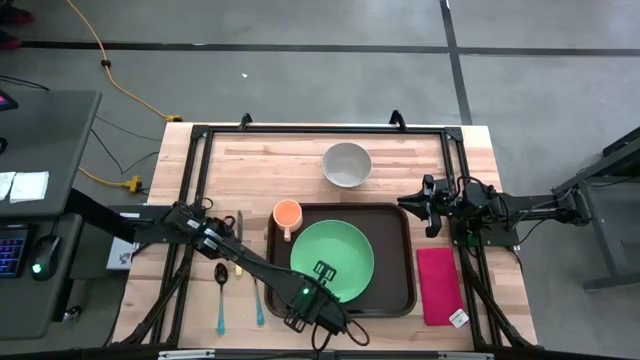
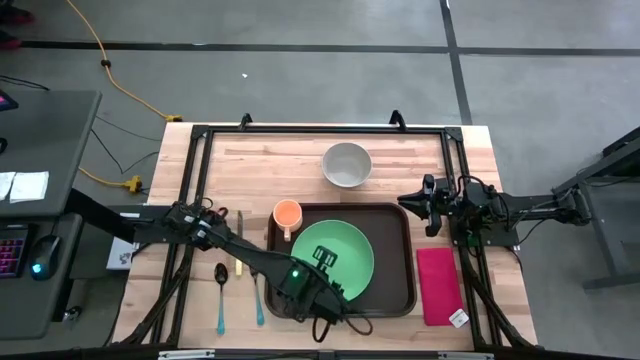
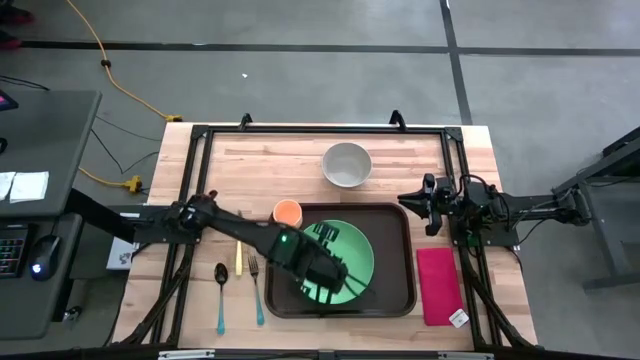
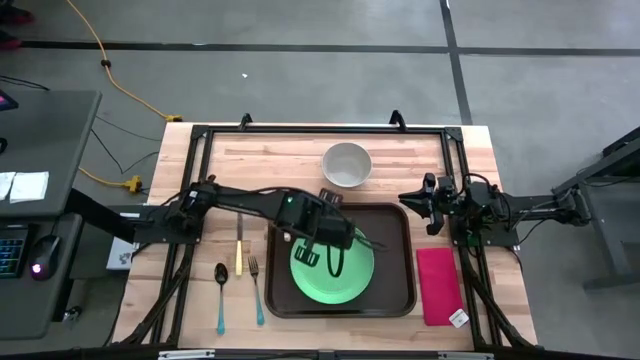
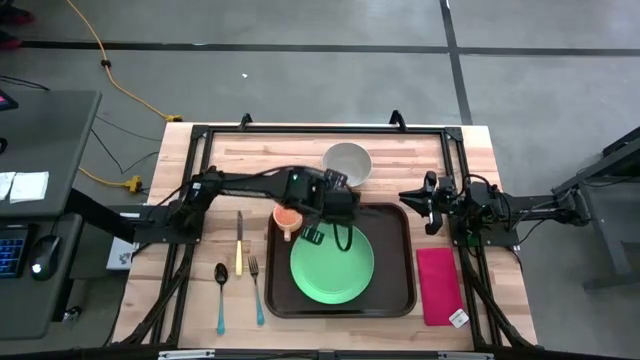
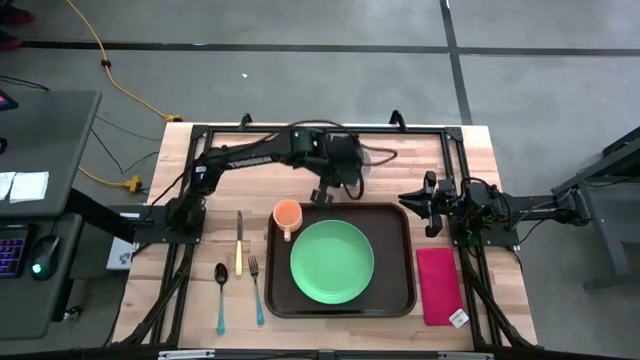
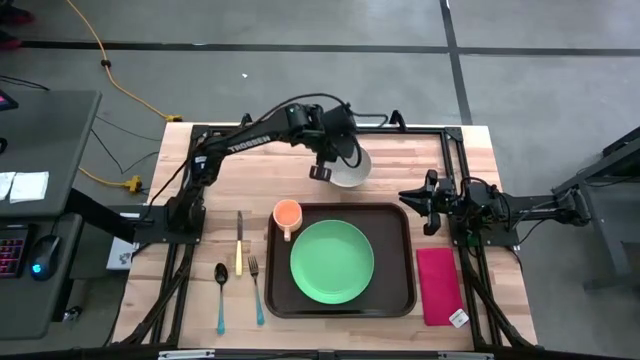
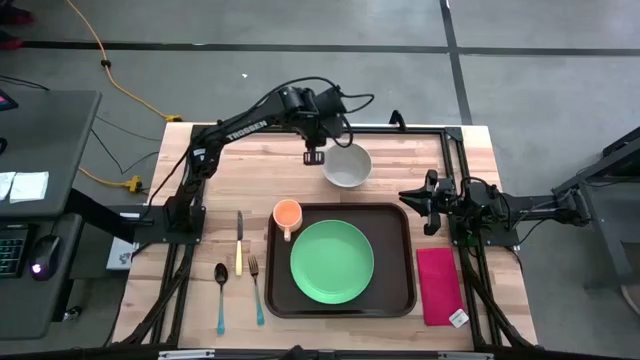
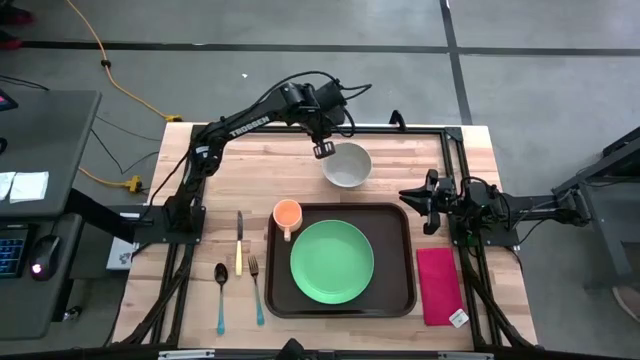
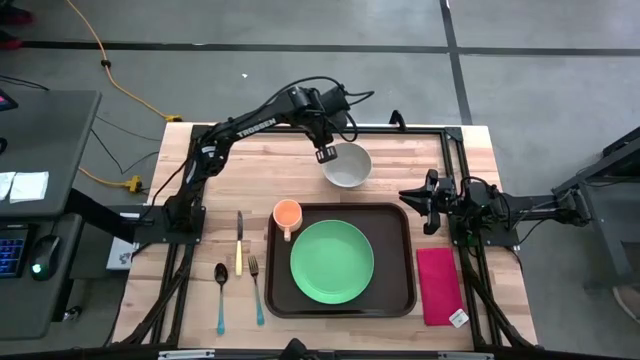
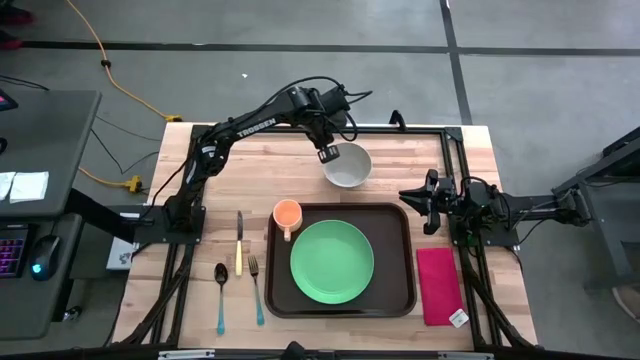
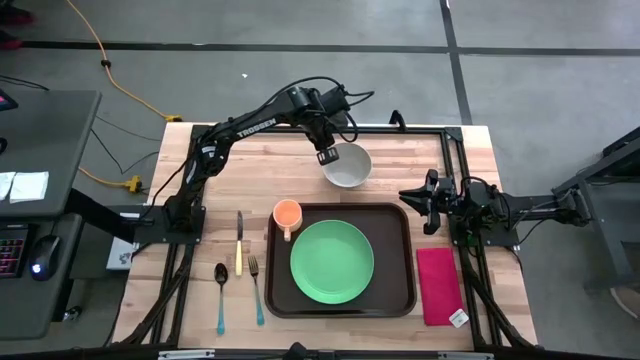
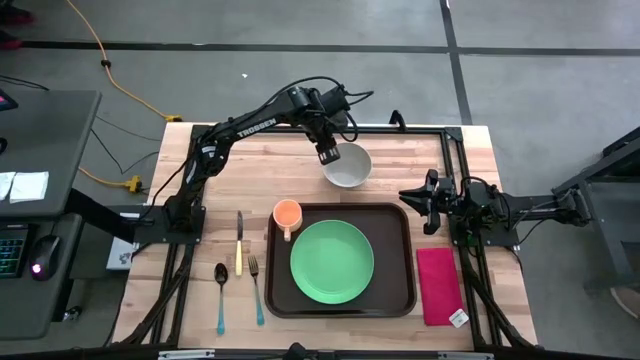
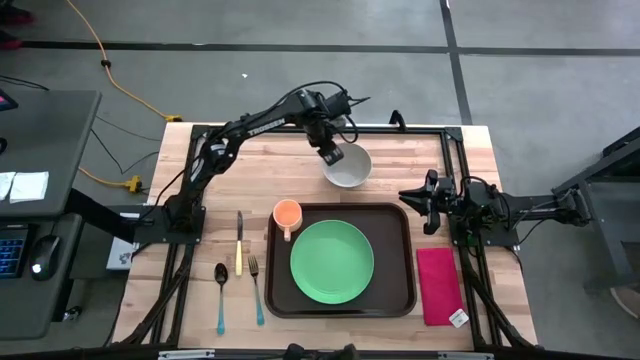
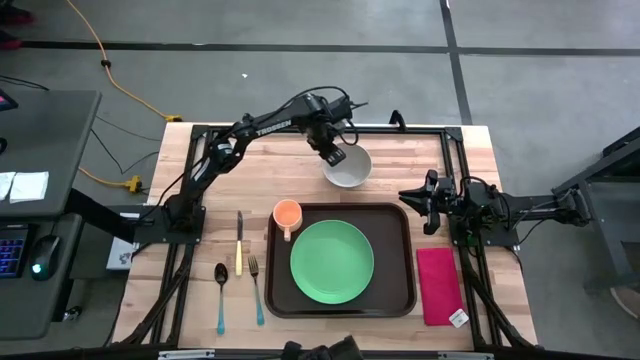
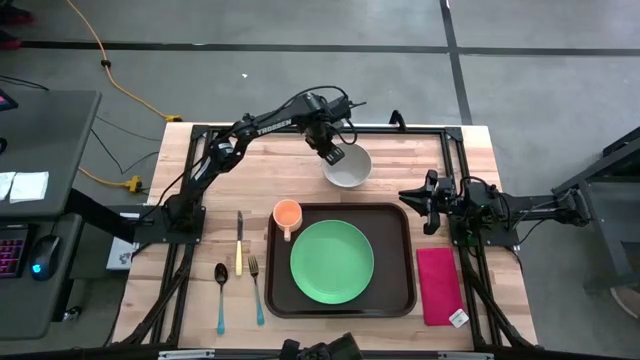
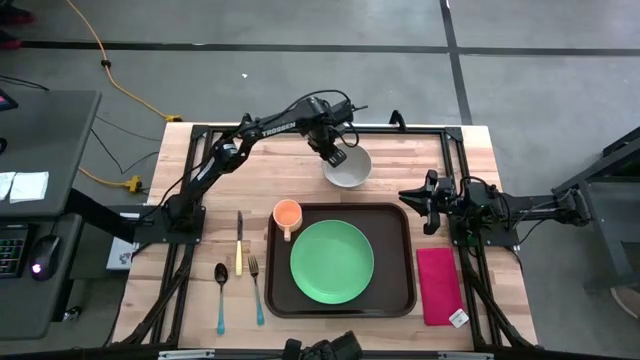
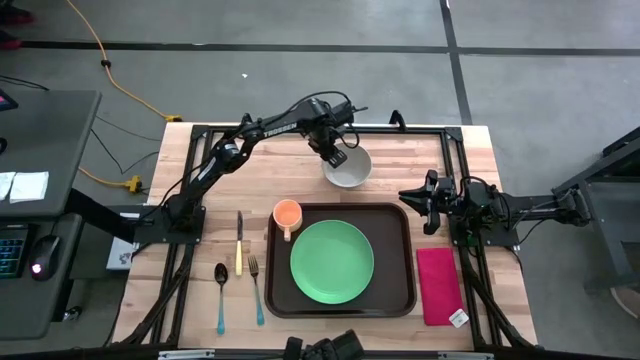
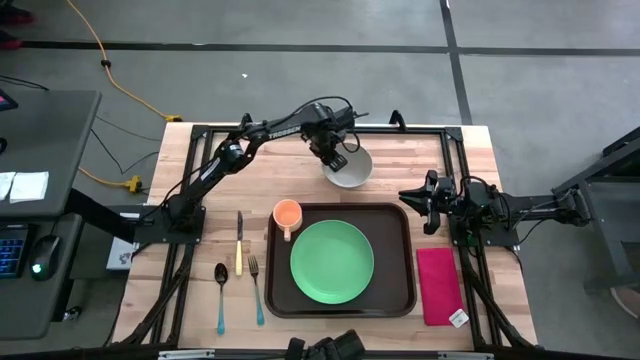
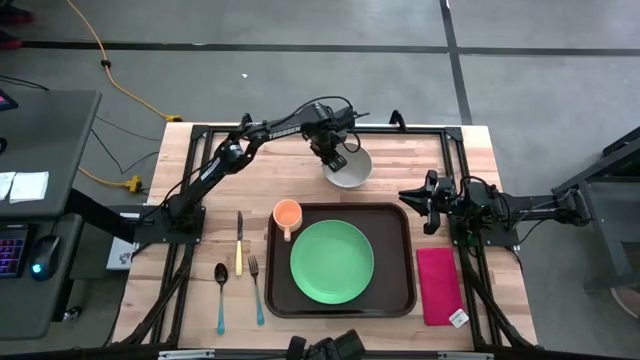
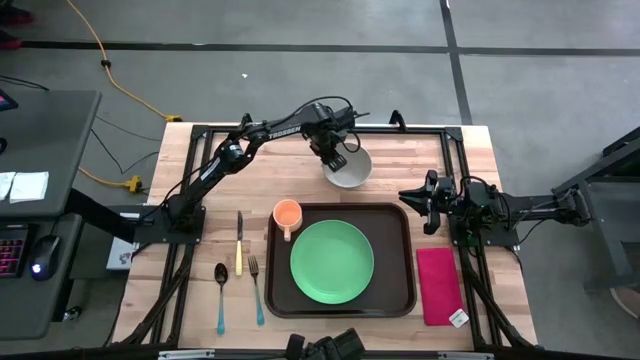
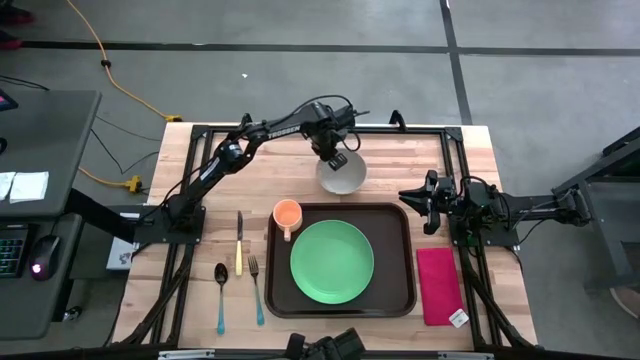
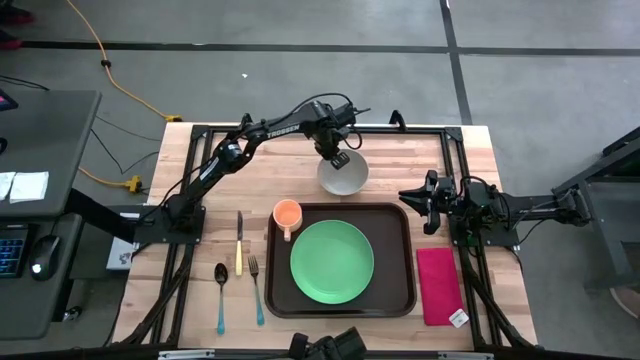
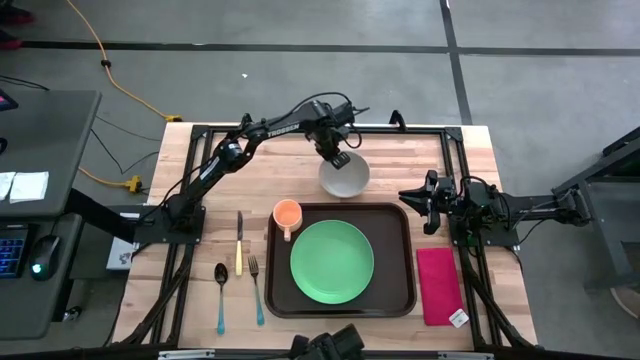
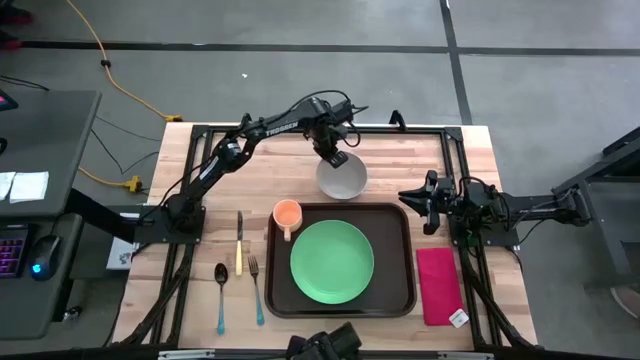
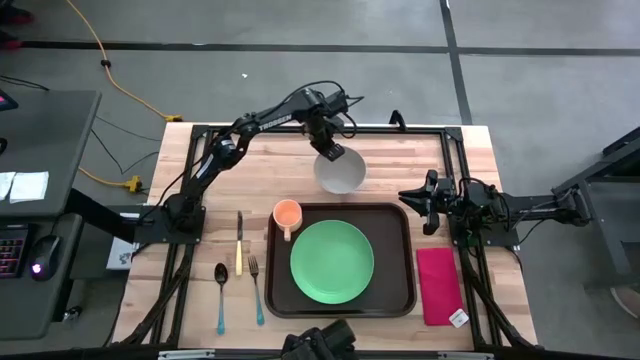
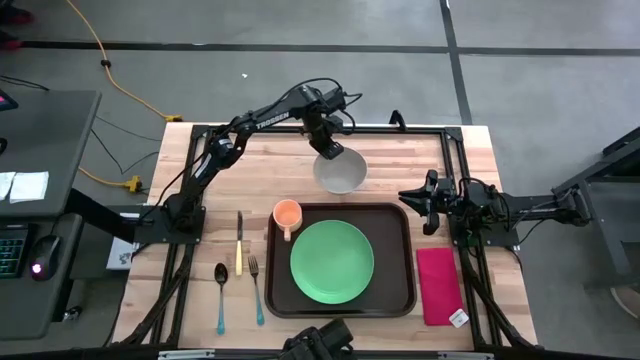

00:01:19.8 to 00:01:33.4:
Task: Set up tray
Put the gray bowl on top of the green plate

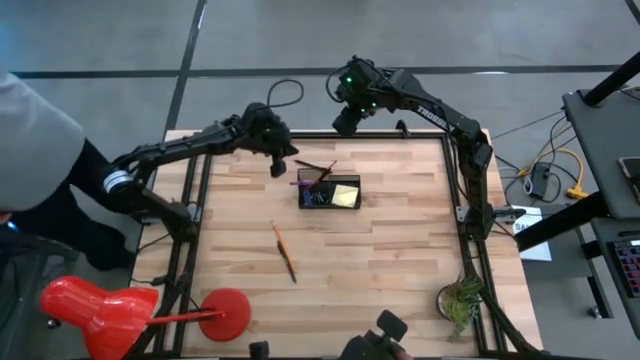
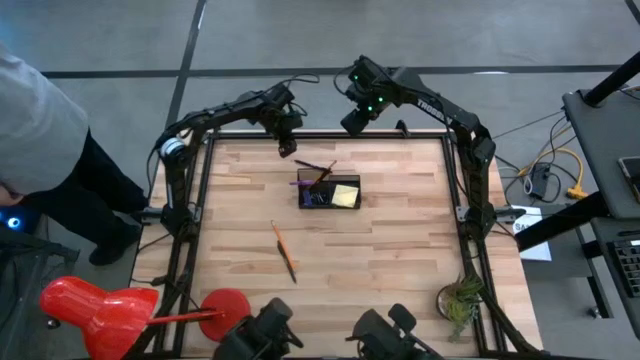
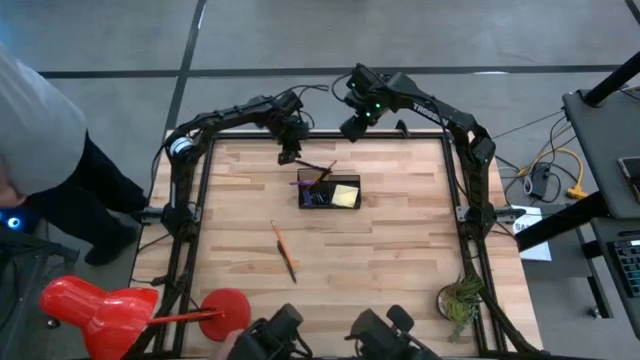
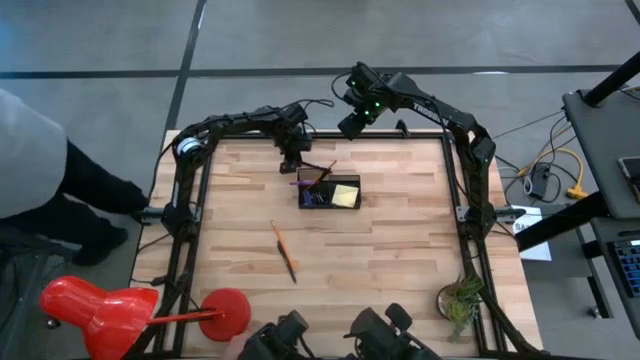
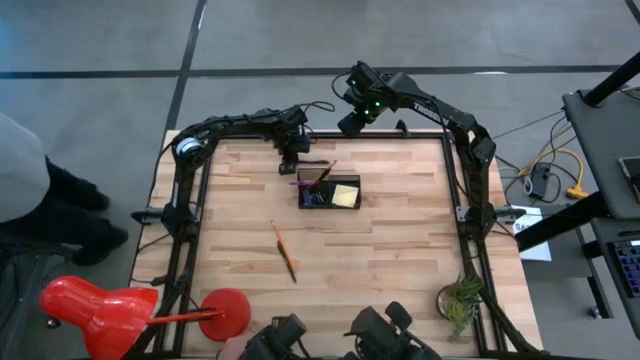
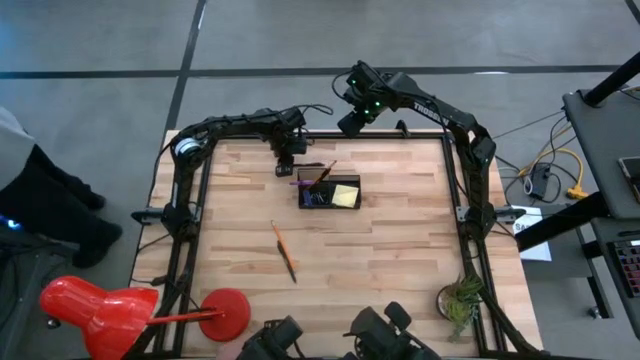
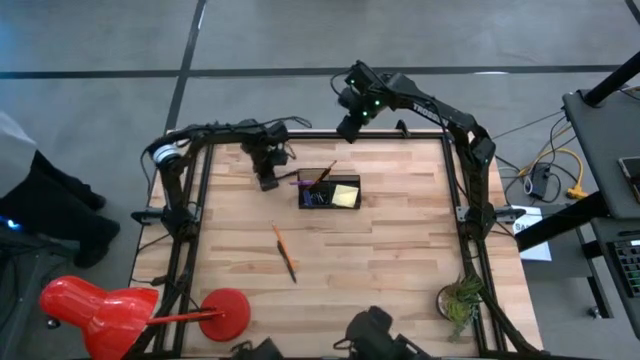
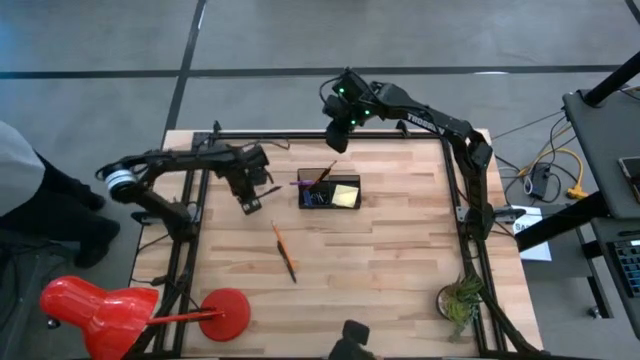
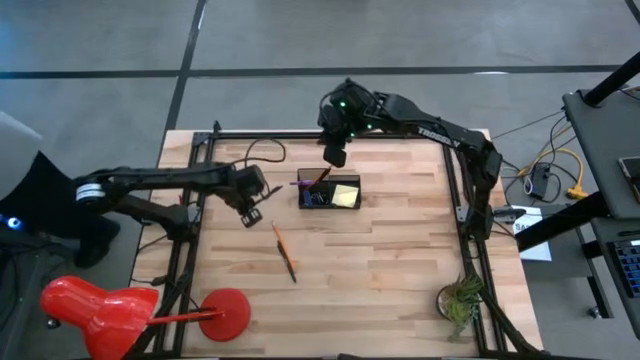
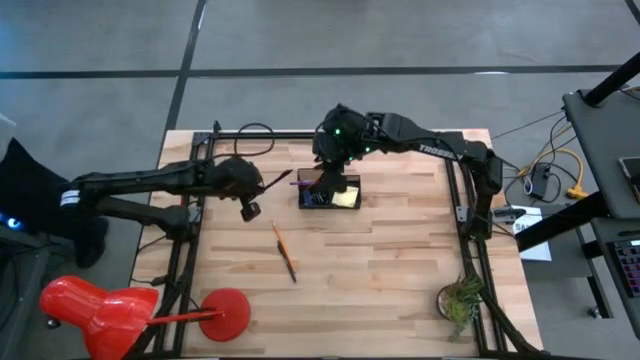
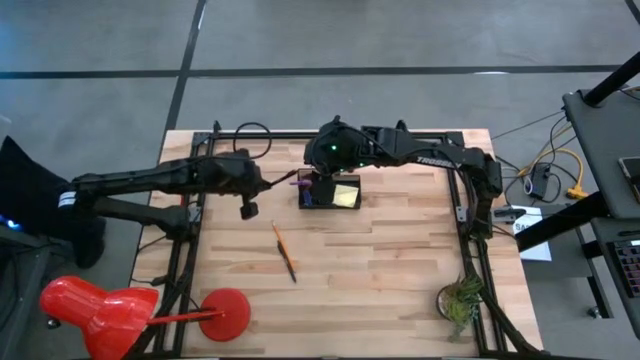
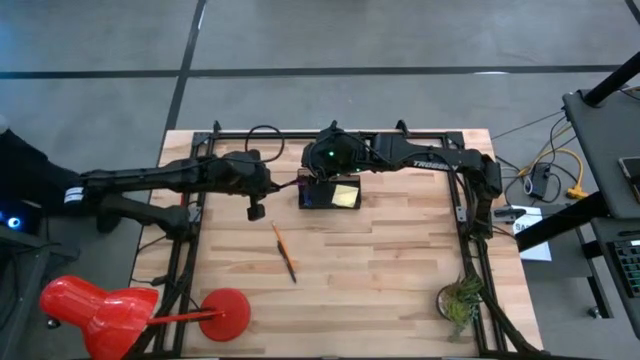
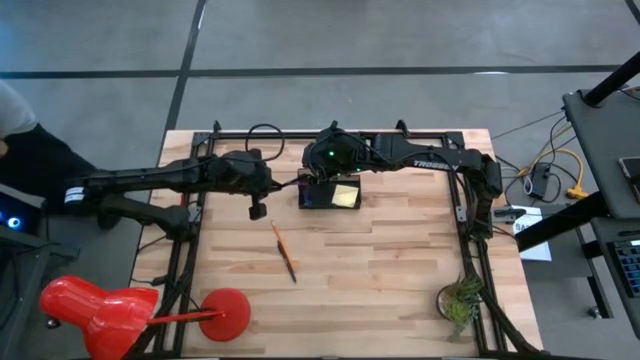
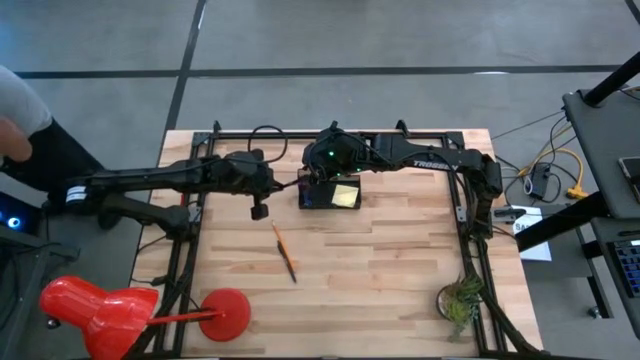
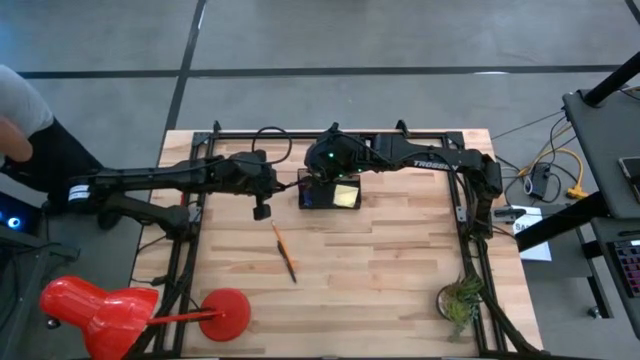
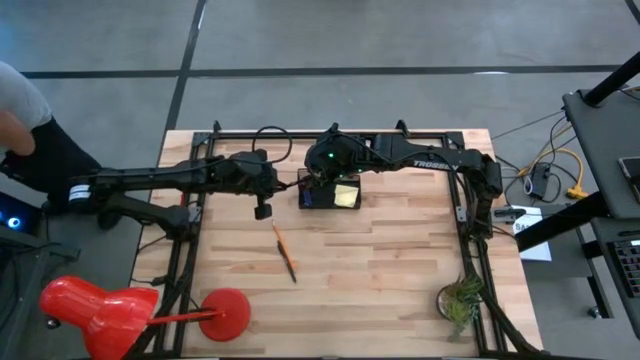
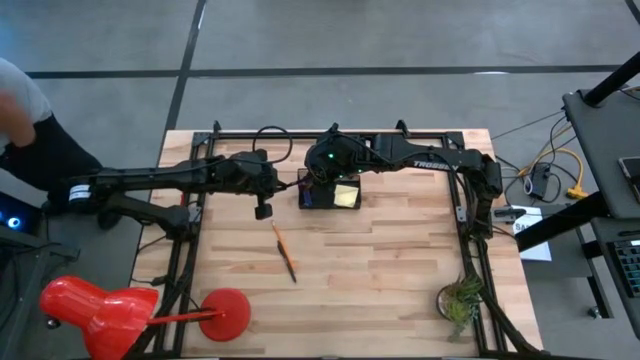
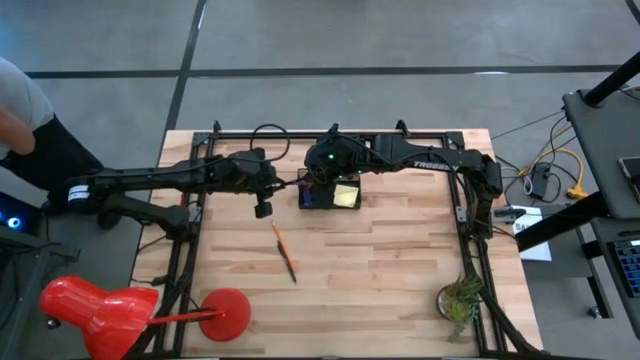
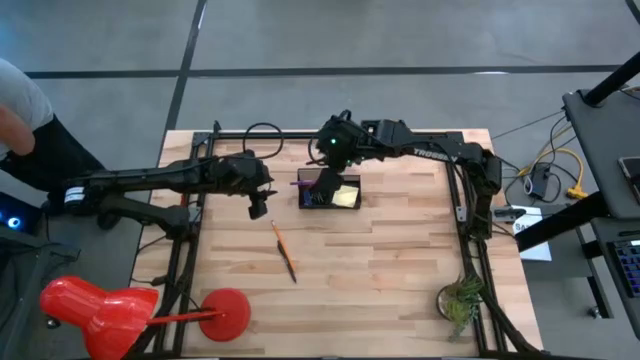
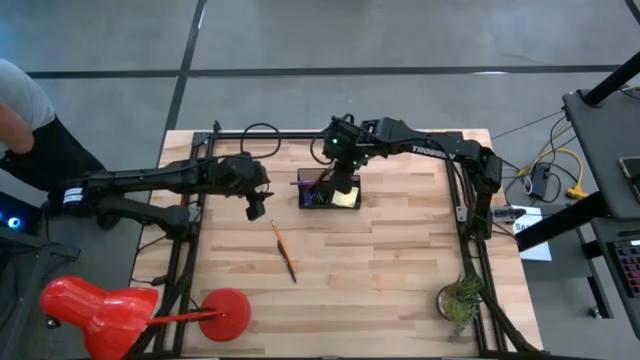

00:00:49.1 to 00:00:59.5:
Task: Pick and place office supplies into organizer
Put the top black pen into the black desk organizer
